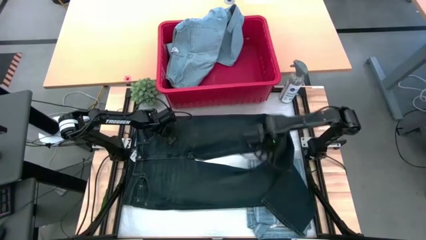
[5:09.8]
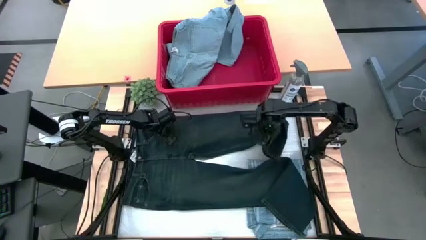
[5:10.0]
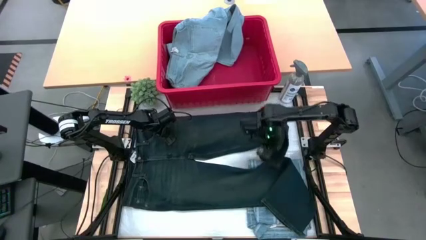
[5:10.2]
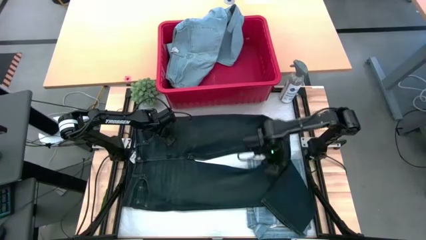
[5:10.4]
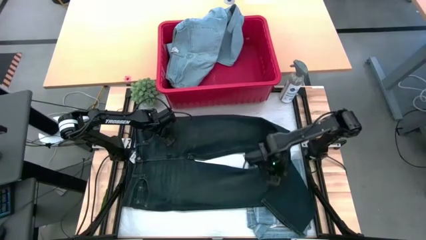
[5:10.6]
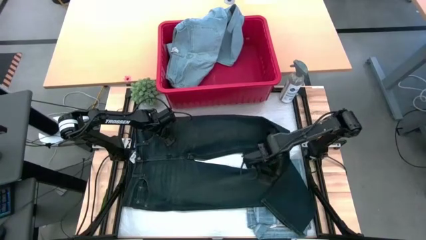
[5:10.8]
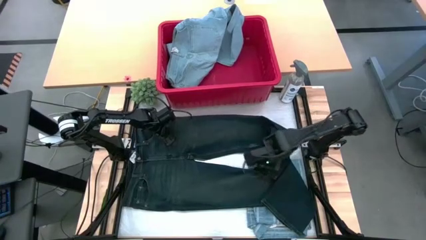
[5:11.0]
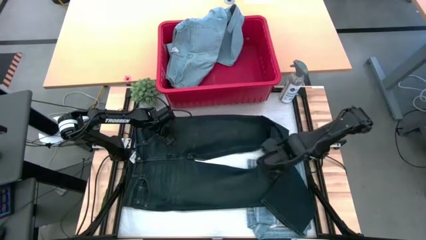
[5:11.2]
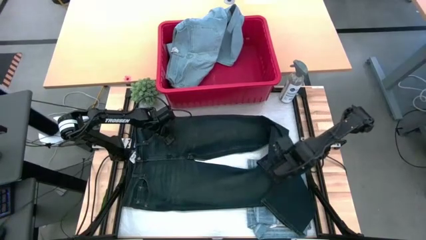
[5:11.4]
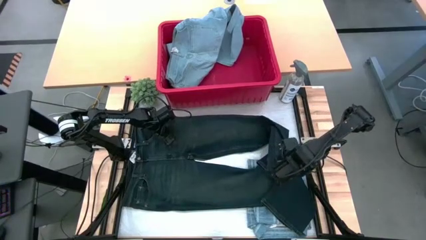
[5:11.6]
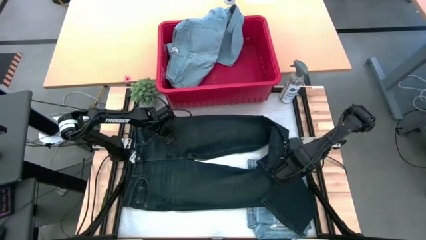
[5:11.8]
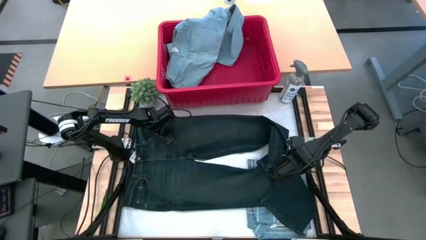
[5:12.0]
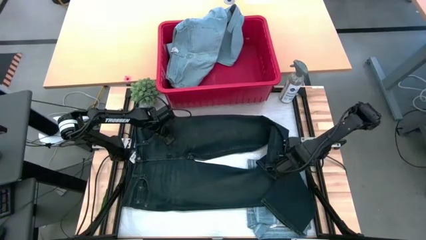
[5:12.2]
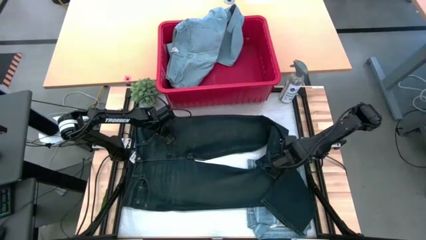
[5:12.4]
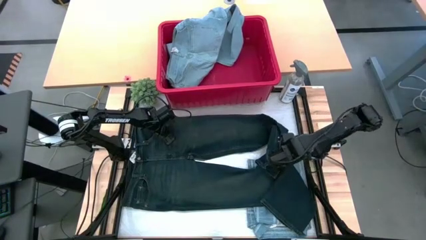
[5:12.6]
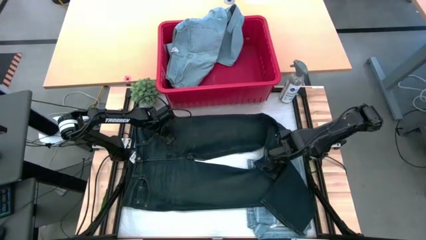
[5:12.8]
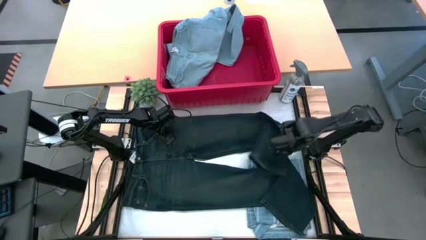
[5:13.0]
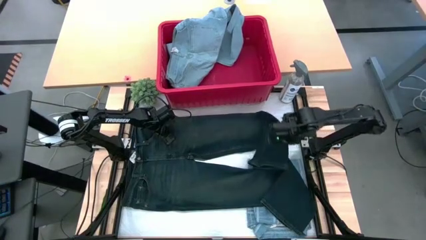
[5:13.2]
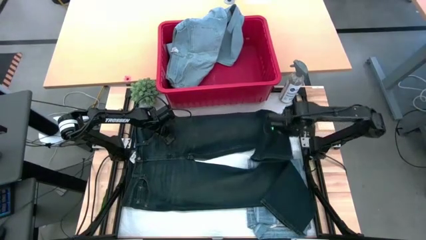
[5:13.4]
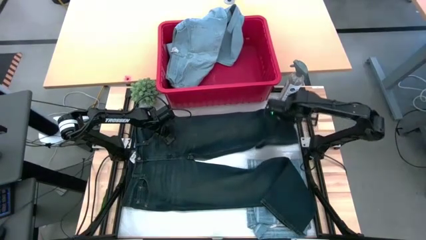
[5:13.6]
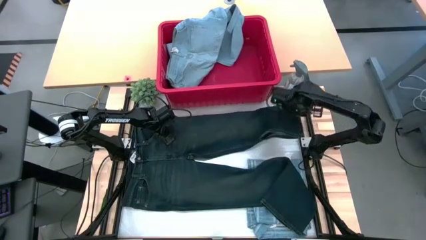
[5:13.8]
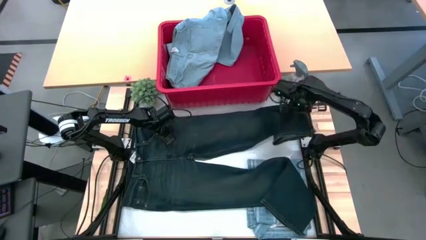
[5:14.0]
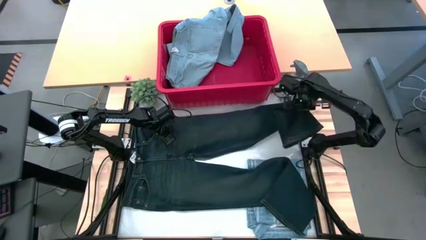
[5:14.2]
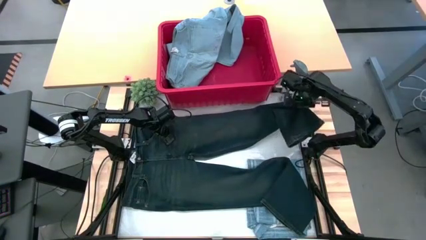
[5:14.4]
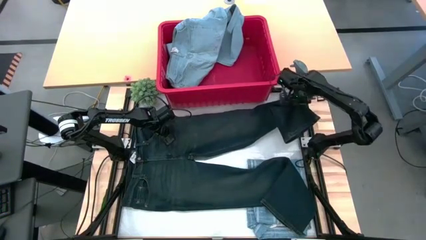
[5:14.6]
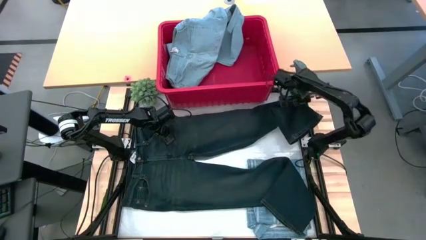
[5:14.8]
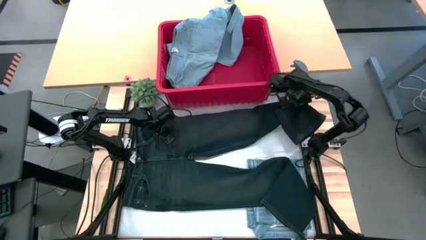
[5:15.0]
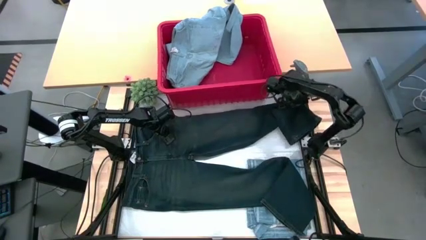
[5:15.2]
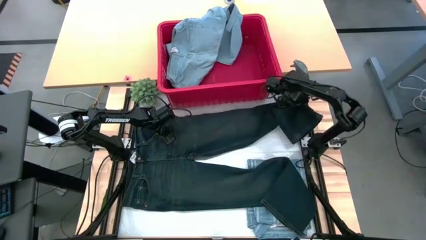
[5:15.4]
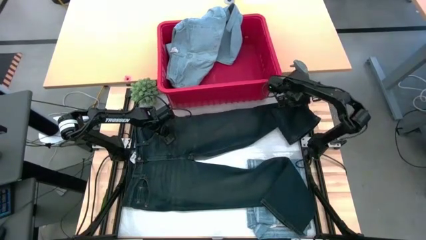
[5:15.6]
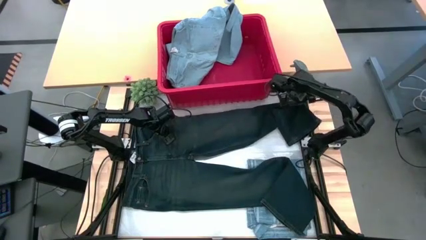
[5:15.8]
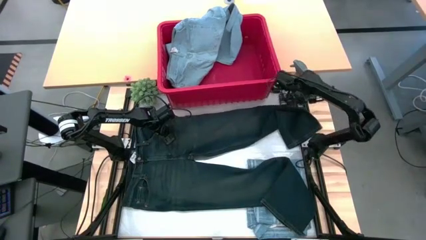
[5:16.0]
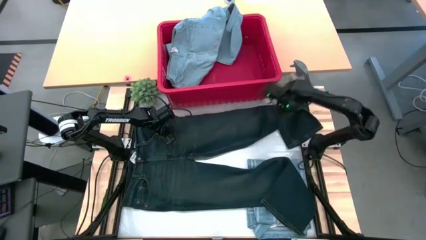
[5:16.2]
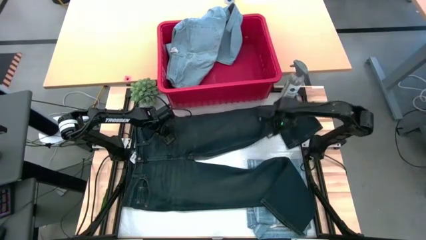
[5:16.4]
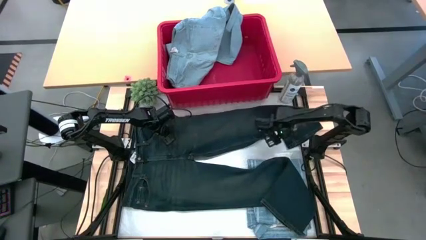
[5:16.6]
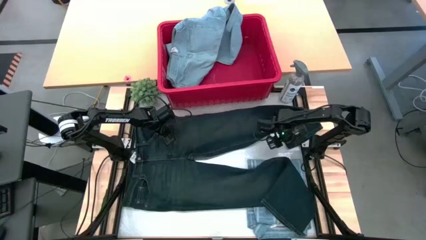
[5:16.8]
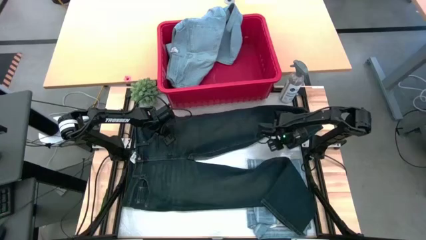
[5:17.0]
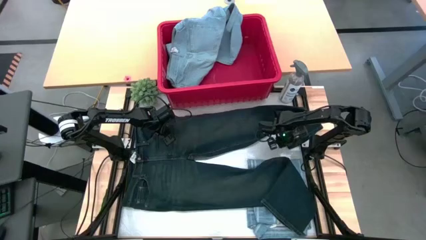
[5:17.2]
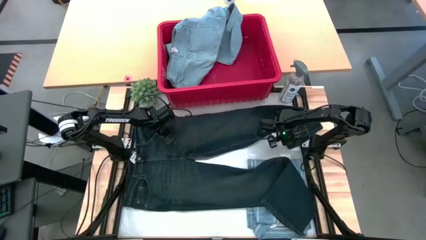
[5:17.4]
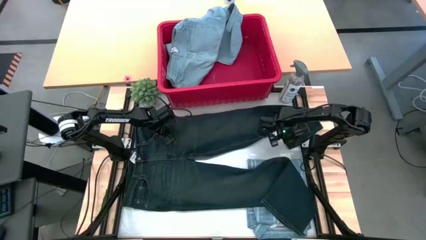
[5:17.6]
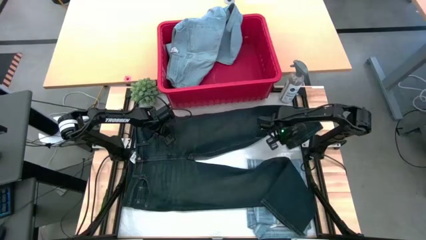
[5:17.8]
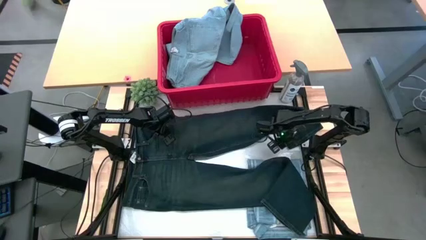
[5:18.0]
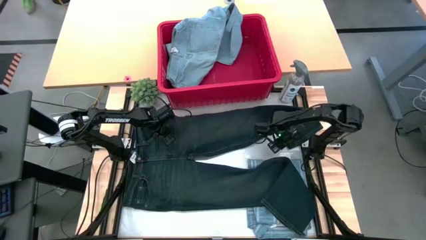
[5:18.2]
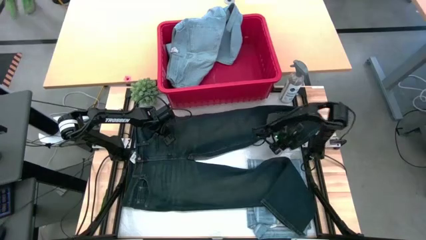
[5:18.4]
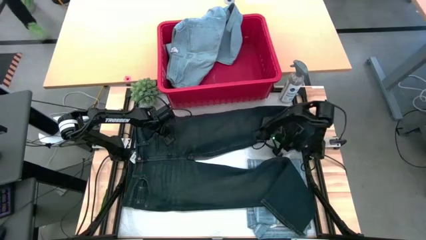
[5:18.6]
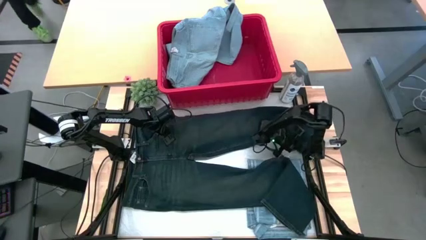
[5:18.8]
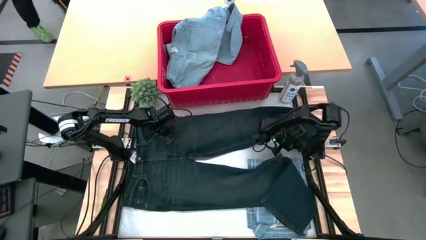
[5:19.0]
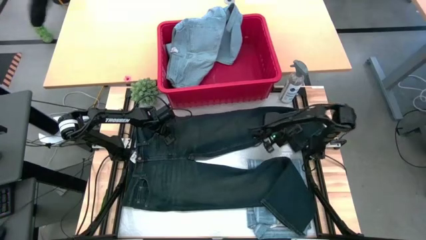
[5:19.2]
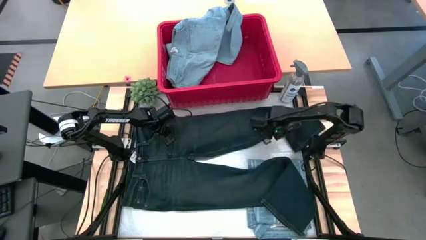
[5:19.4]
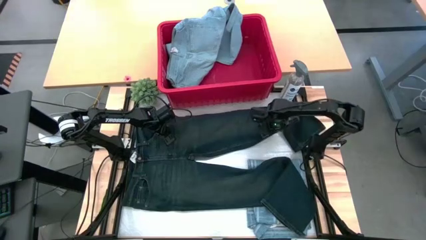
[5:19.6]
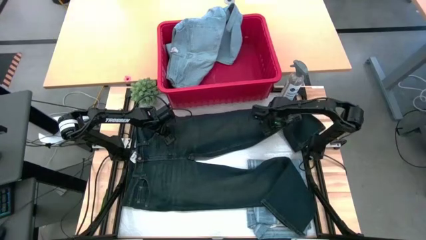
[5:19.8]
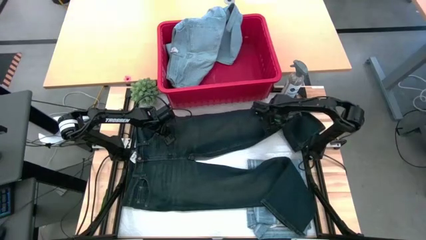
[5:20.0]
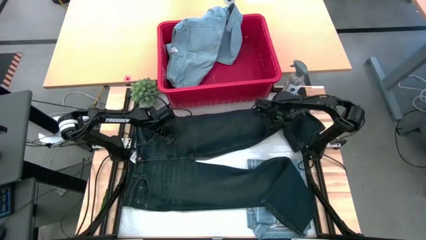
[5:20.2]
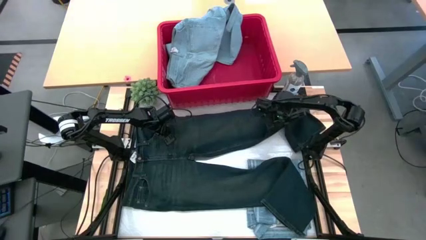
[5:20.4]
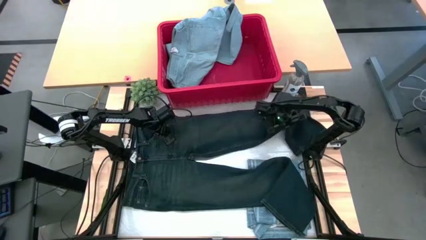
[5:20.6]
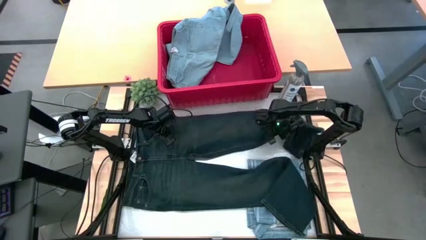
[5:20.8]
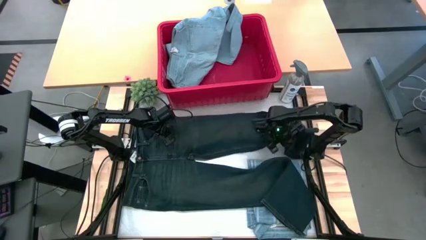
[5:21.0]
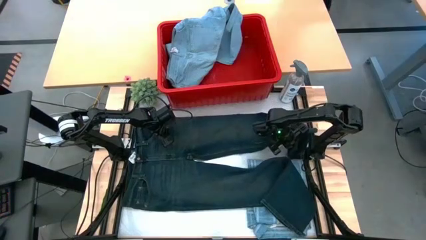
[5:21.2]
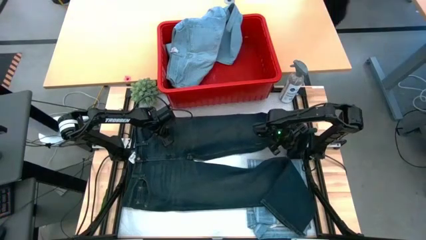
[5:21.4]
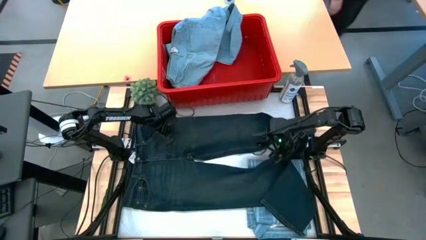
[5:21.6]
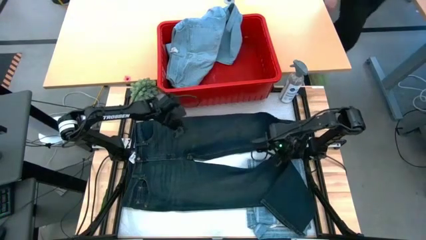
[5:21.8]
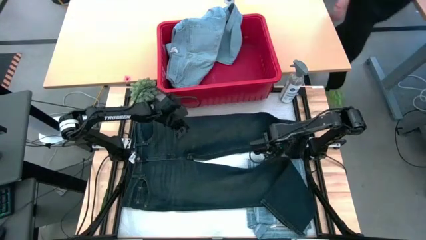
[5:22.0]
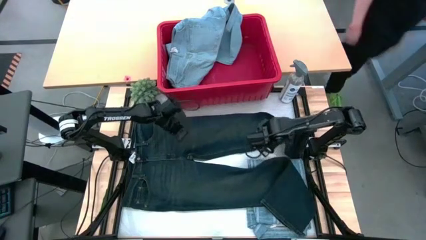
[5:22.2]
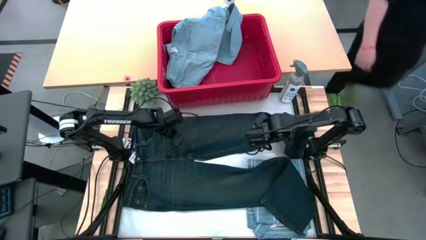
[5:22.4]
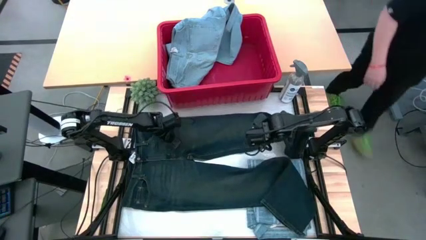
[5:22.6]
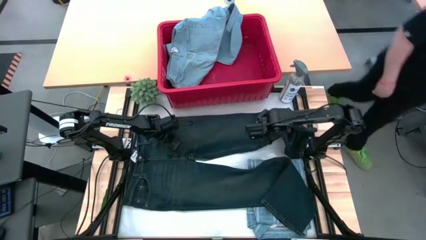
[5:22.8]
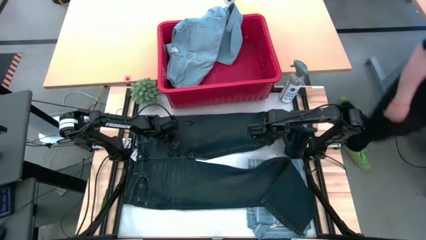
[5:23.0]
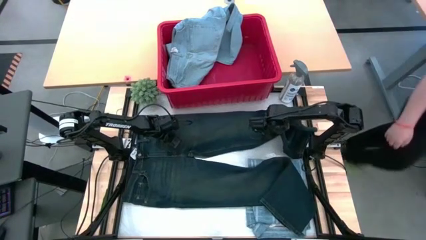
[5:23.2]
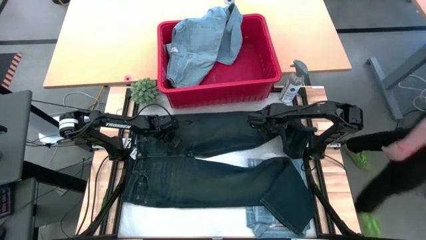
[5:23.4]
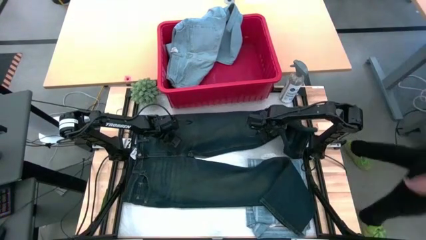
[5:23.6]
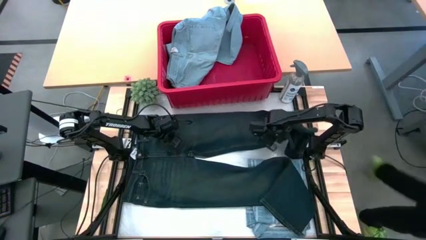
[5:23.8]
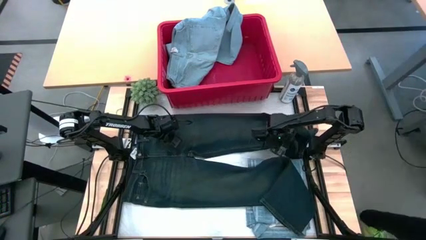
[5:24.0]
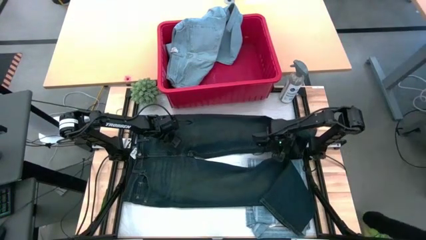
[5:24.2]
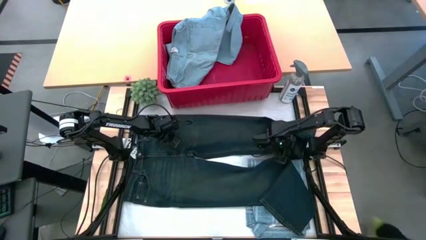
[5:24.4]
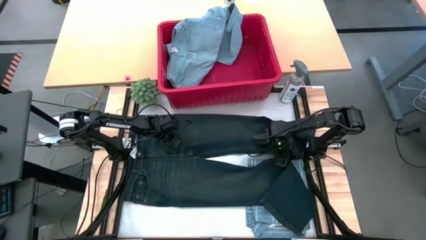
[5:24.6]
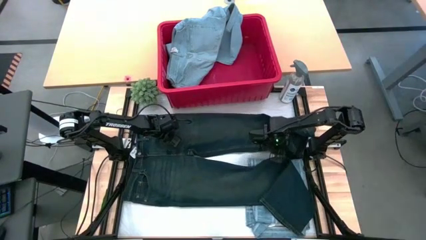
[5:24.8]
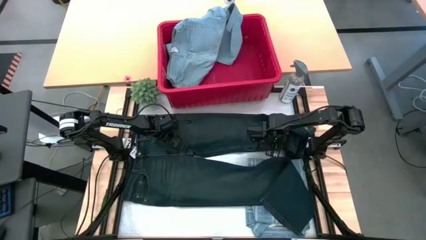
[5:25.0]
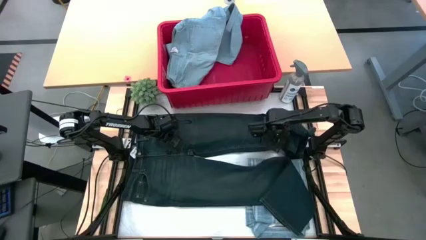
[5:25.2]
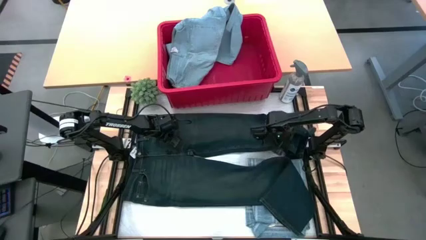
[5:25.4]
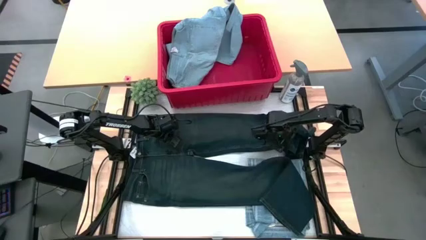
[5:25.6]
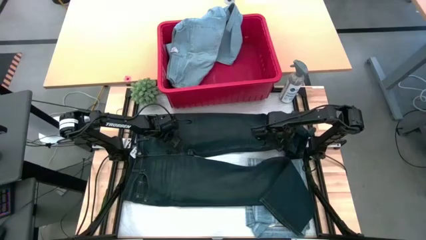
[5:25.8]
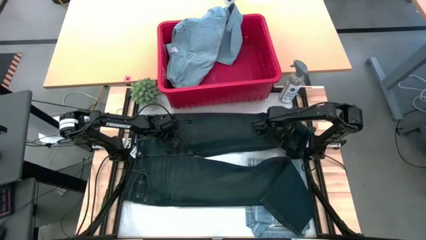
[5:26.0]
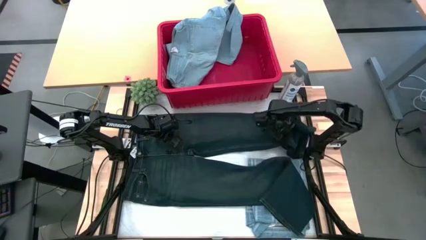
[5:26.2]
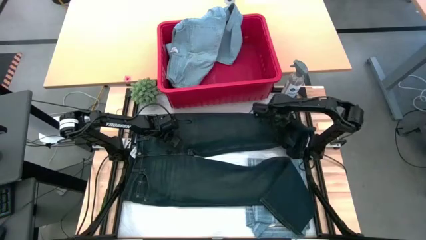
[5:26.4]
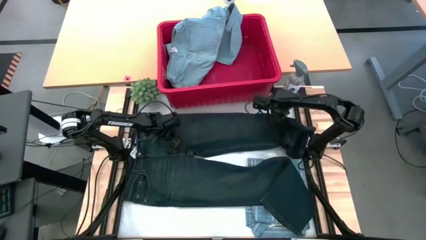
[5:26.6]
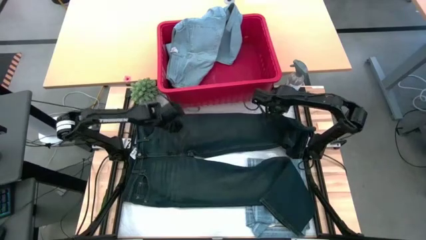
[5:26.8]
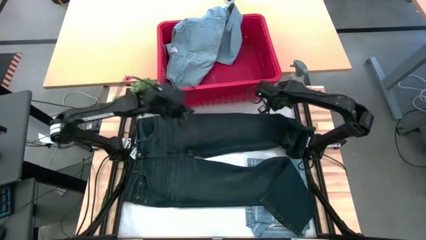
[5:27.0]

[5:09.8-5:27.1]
Task: Fold Laundry from Bin
Fold the blue denim pants
